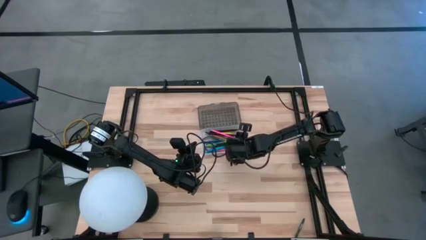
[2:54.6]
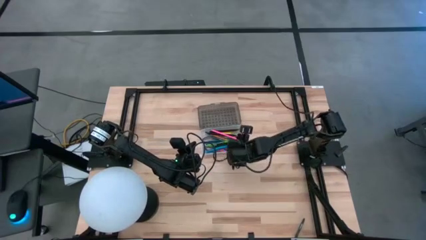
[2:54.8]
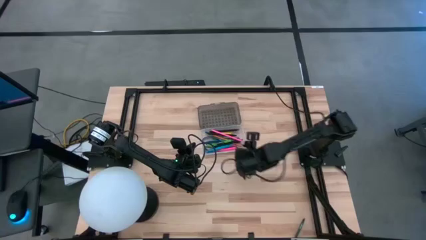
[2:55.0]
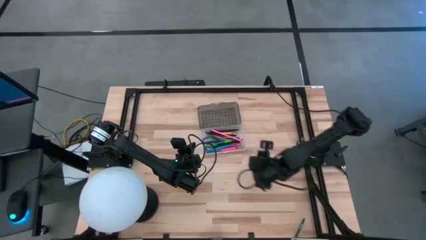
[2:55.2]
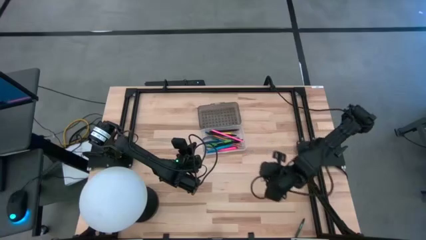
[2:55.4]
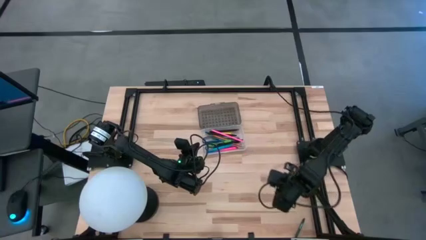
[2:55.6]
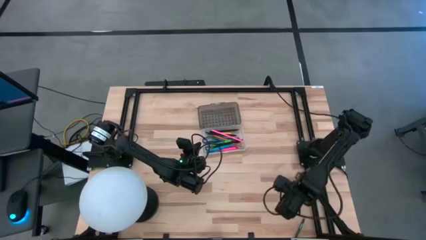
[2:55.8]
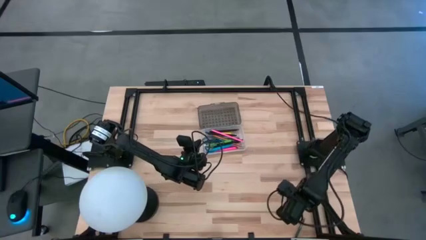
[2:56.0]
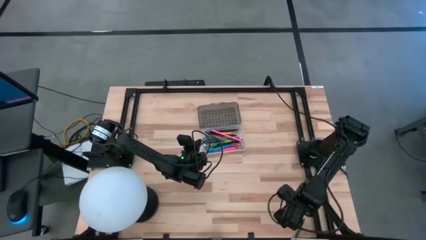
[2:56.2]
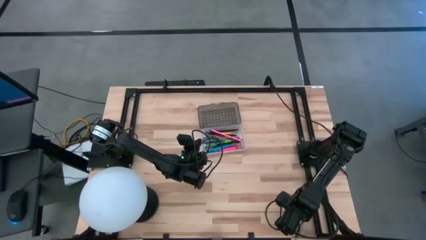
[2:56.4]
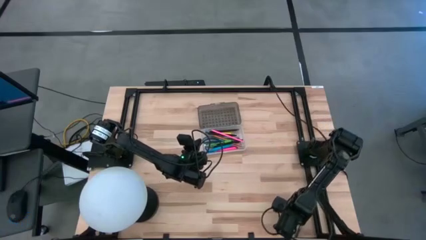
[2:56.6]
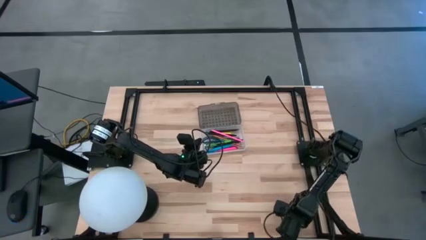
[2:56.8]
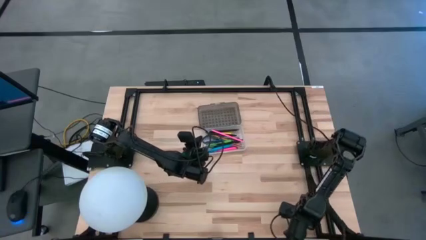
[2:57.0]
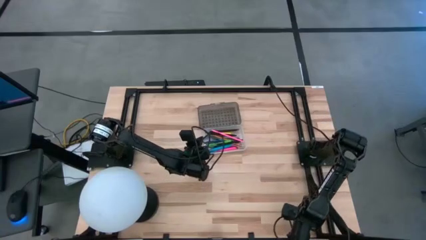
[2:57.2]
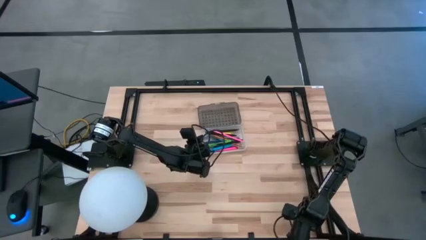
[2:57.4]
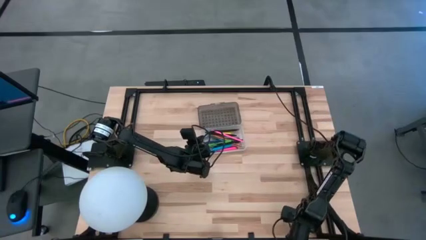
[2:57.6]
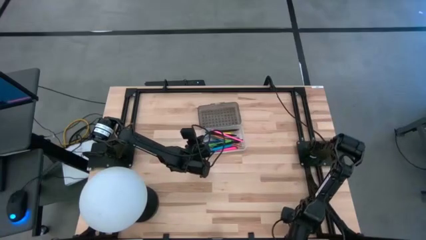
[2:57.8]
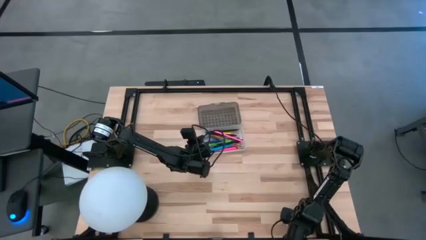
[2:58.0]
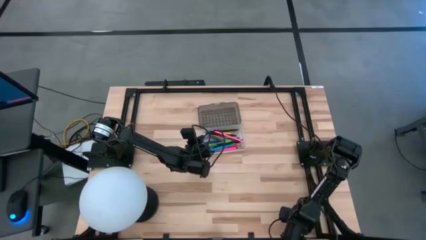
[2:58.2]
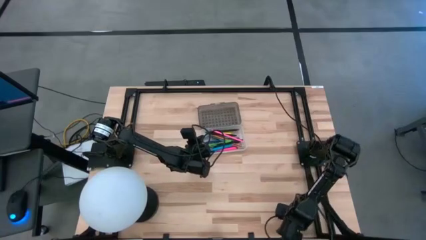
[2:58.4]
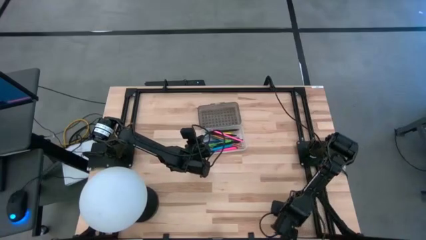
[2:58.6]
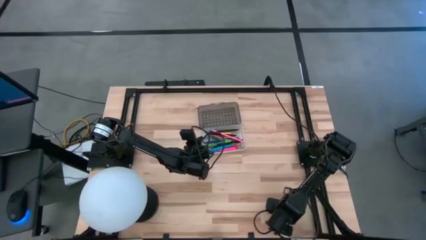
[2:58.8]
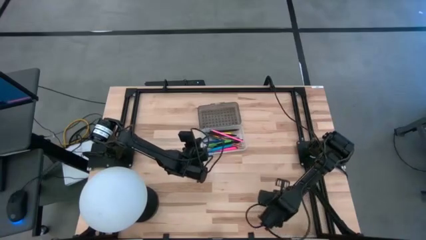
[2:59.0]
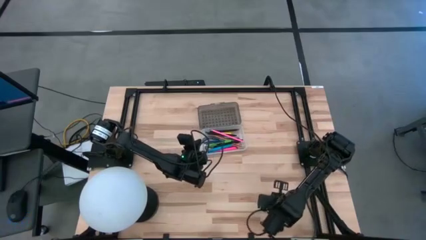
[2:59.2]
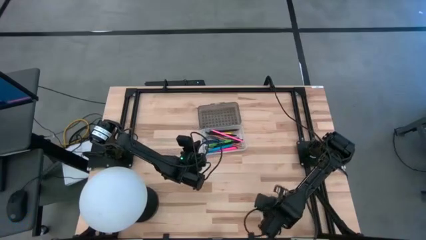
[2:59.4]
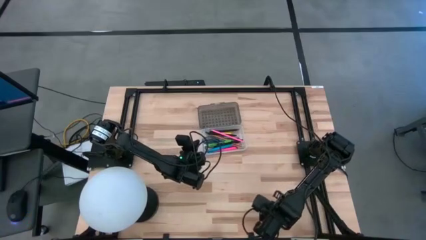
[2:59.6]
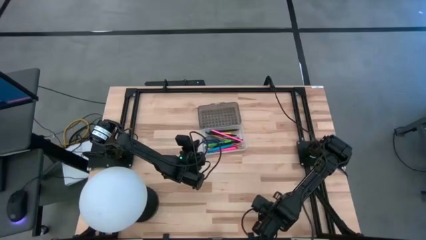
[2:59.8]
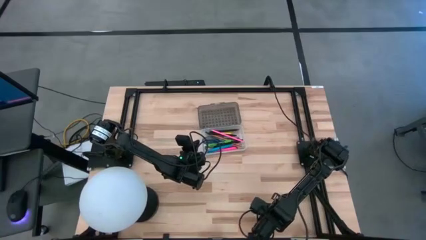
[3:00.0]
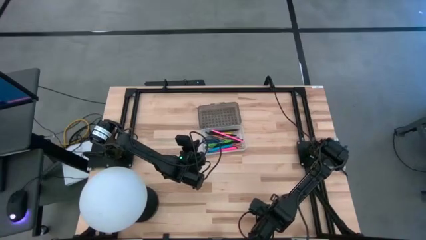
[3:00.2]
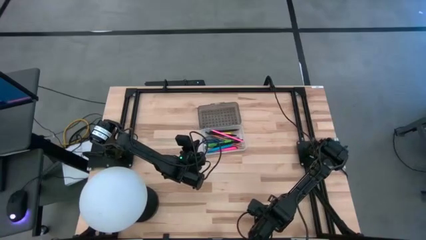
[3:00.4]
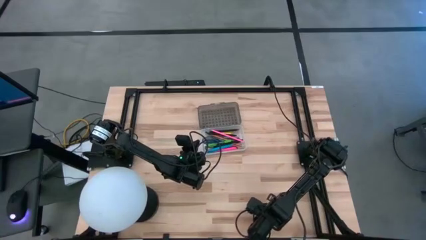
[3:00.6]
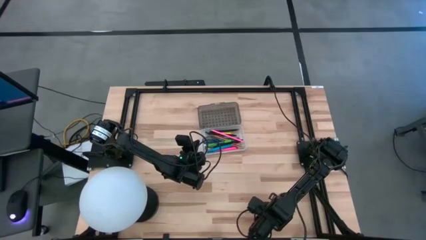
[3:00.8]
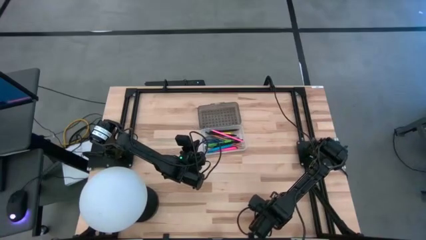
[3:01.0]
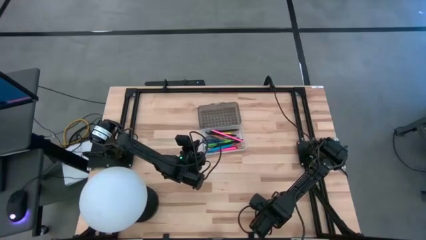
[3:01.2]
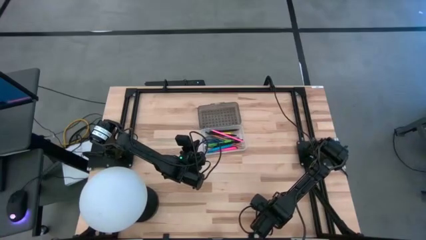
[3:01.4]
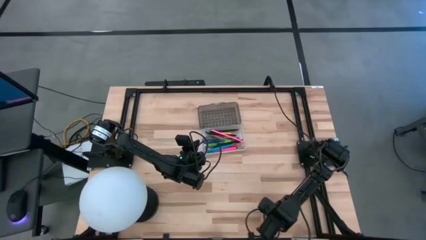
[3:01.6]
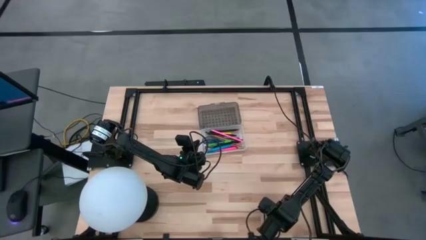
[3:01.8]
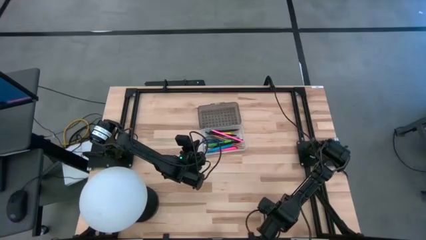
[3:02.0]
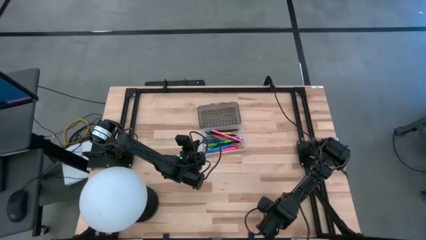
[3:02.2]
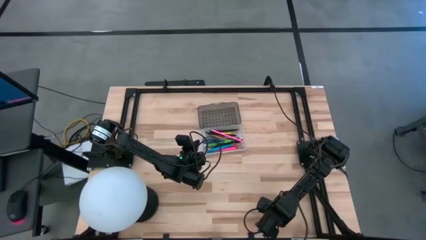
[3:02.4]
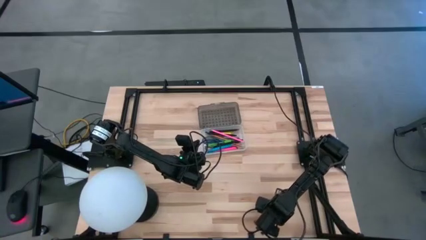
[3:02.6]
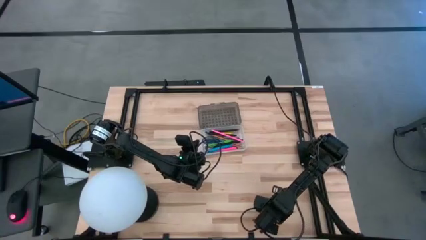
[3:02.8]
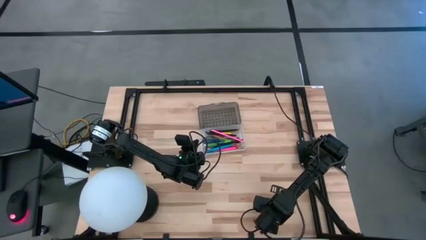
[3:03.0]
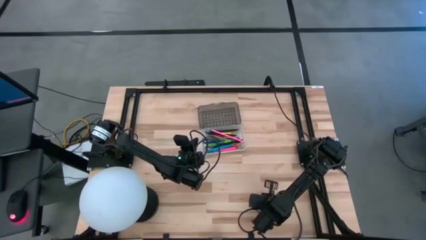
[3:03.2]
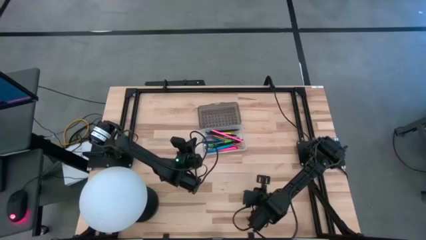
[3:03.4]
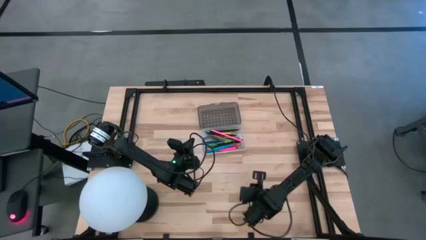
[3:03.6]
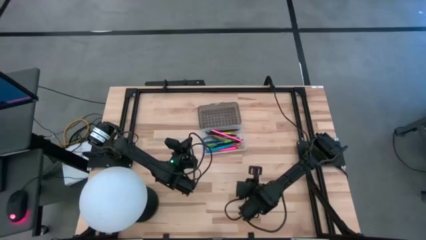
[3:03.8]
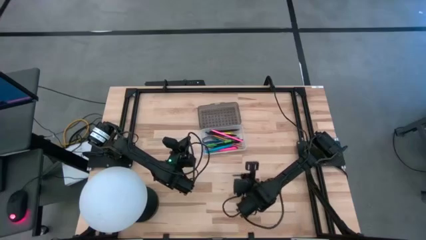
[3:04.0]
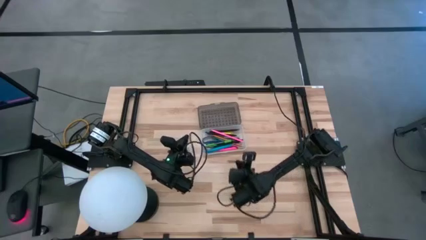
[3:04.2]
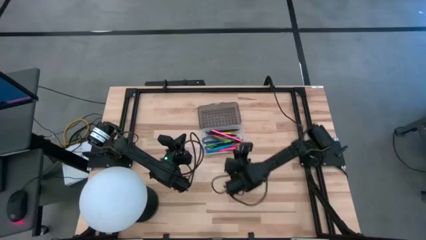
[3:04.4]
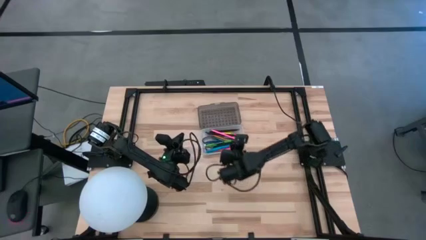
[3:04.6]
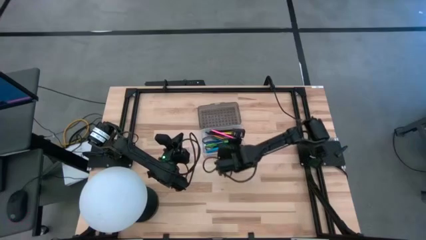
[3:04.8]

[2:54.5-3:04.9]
Task: Pick & place school supplies into a supply box
Put the green crayon into the supply box

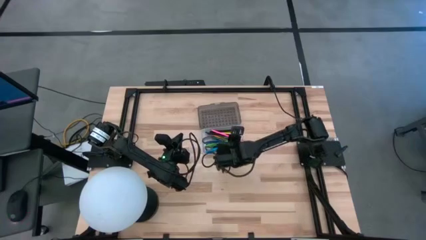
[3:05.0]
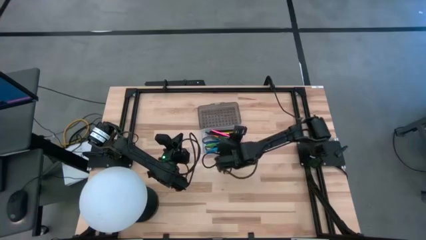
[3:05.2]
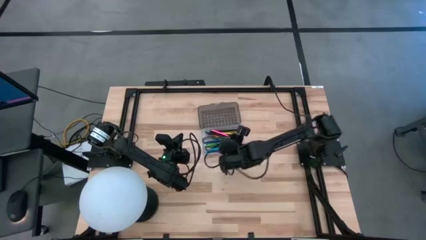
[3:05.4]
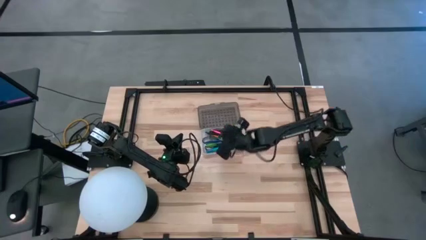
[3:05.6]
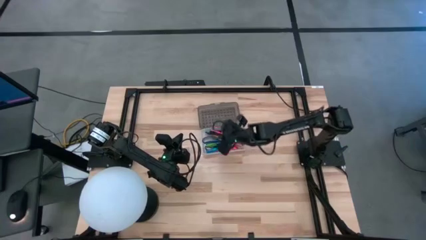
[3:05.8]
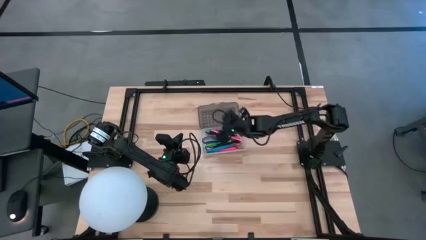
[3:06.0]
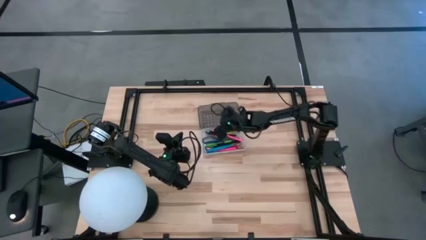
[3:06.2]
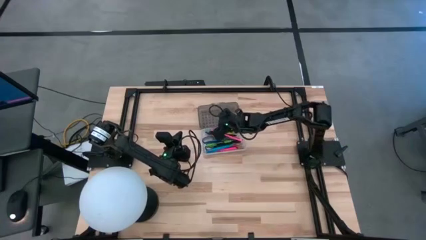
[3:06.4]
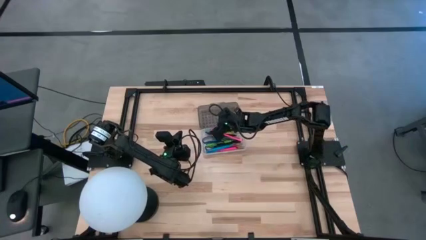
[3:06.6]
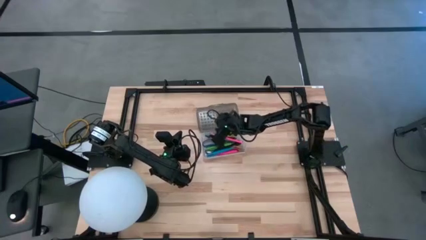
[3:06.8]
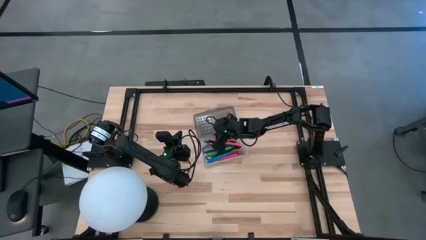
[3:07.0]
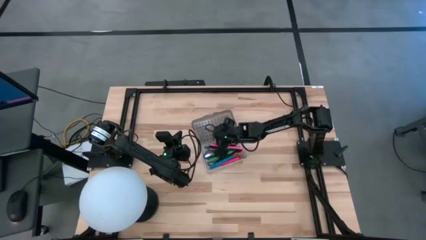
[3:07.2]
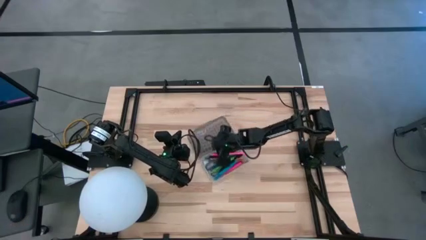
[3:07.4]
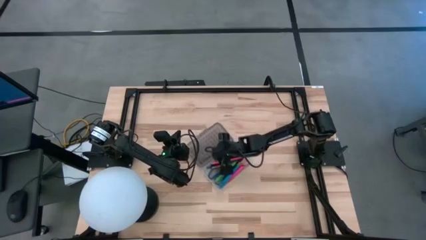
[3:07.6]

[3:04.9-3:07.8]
Adjust the supply box

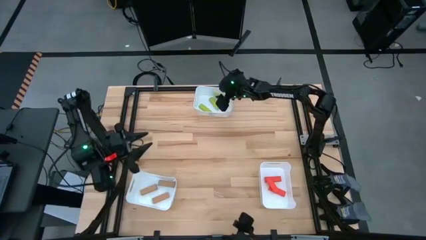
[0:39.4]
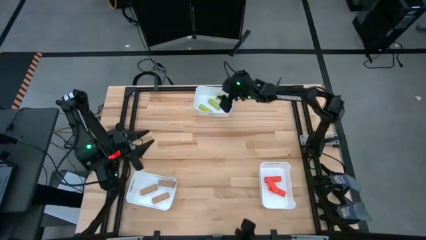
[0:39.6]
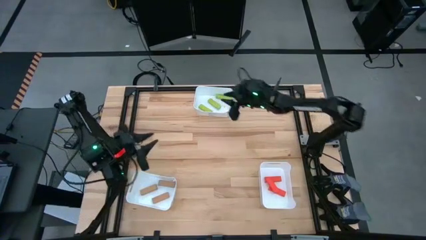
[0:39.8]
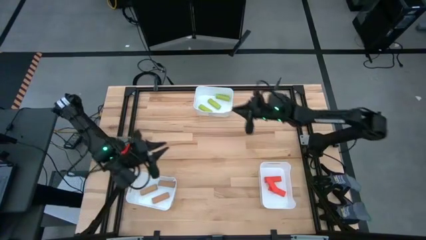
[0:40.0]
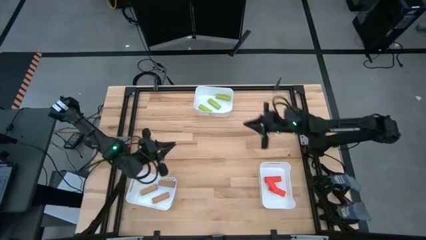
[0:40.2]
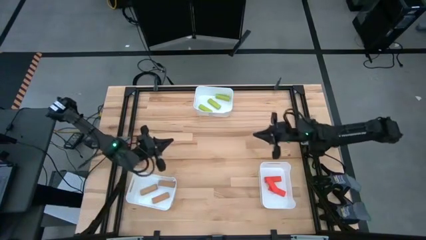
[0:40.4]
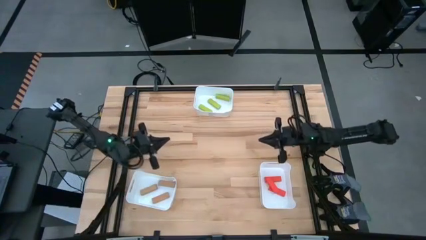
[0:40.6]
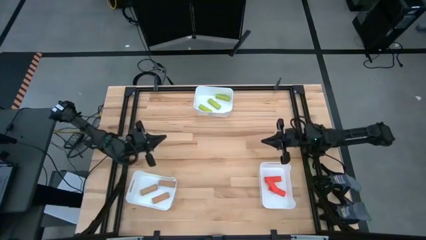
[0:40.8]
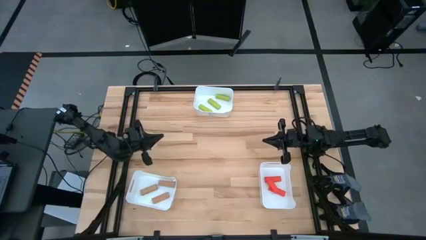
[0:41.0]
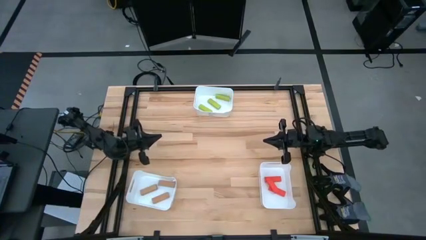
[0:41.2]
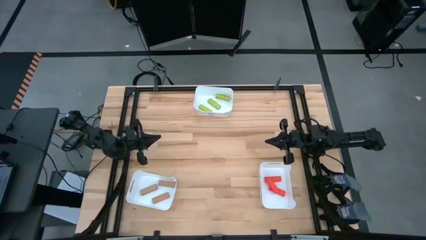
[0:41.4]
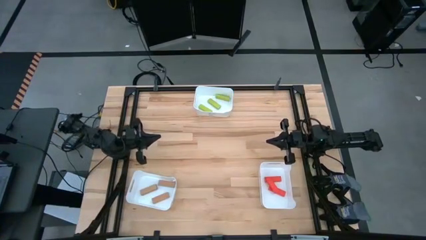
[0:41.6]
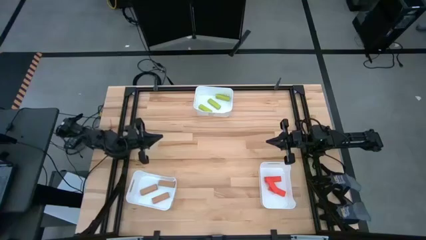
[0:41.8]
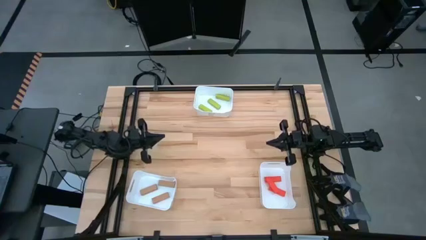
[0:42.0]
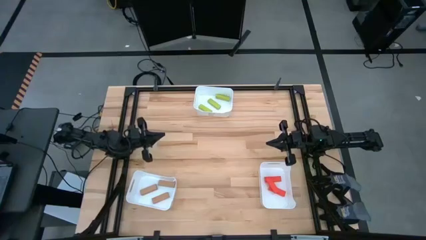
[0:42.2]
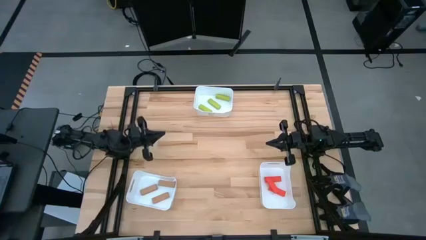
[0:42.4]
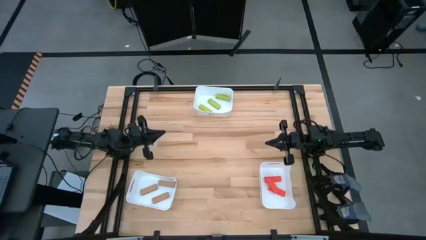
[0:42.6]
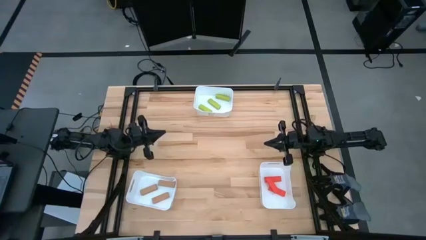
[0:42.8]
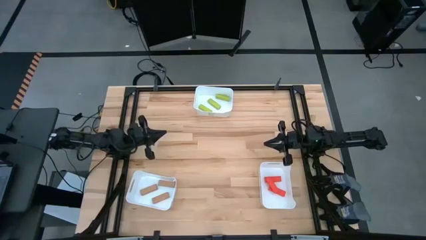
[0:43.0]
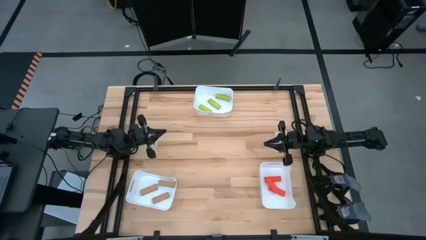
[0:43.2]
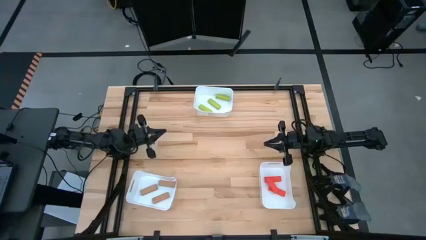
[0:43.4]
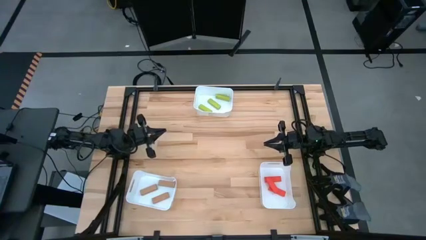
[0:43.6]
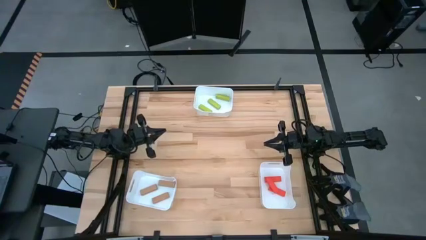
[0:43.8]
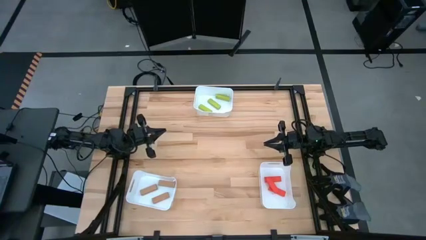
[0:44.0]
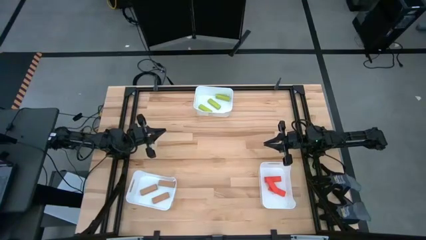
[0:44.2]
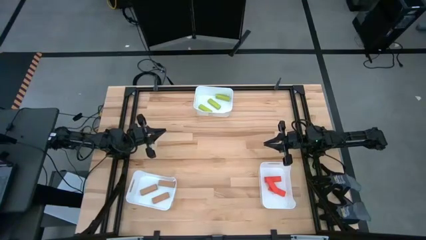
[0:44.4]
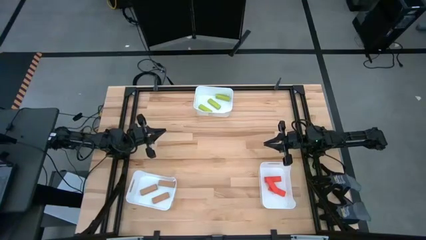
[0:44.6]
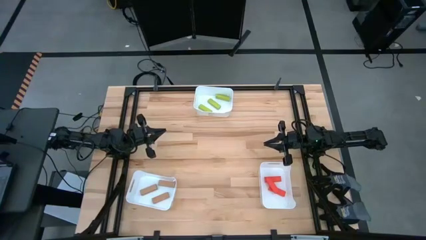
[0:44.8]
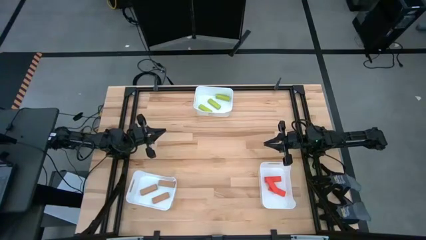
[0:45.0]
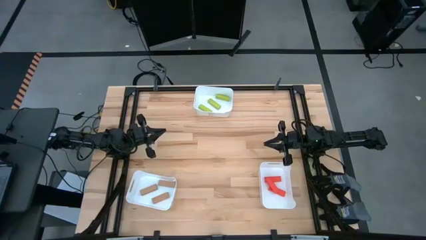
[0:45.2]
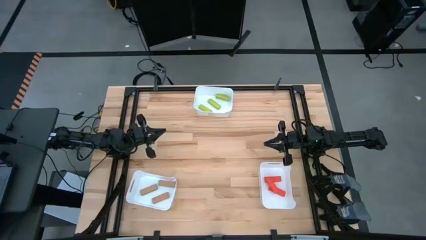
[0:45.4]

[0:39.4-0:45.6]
Task: Sort blocks
Return to Home Position
